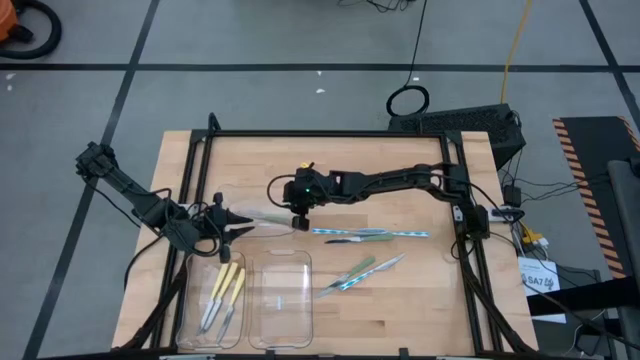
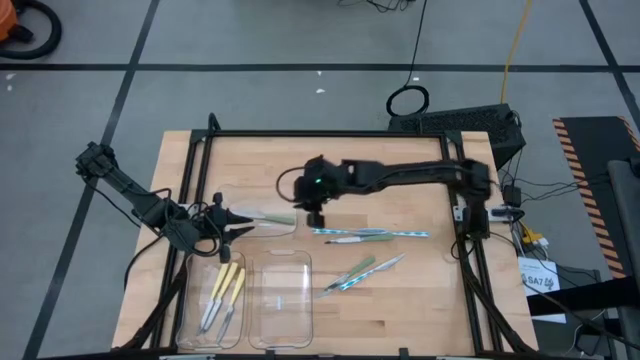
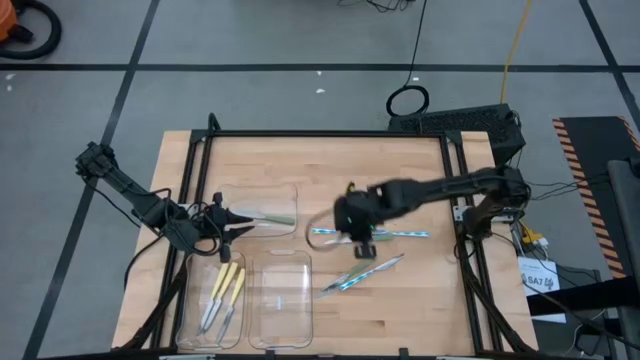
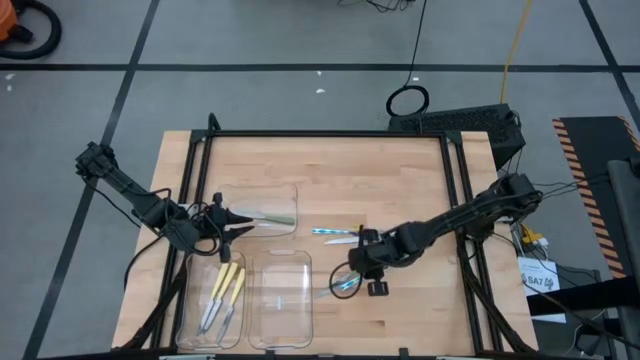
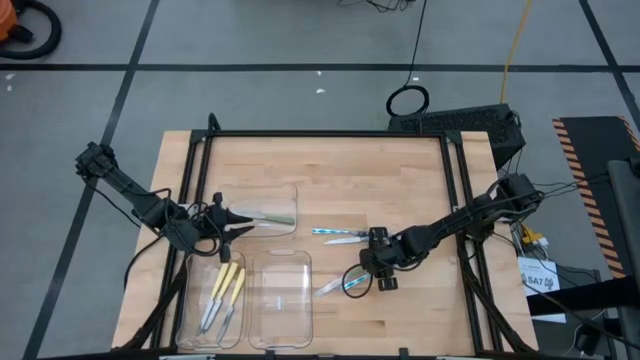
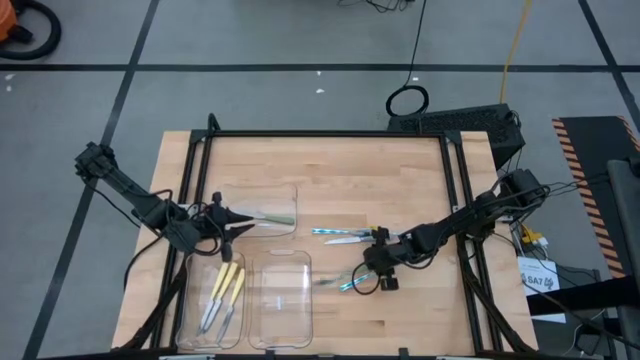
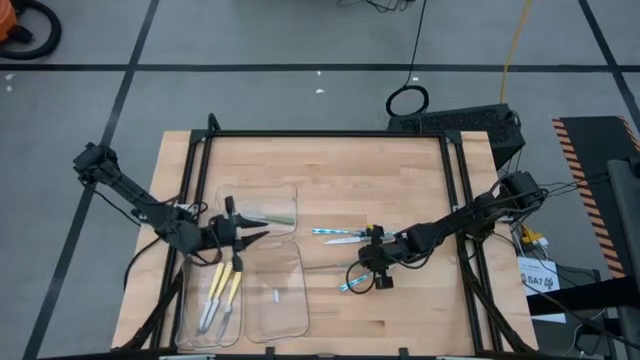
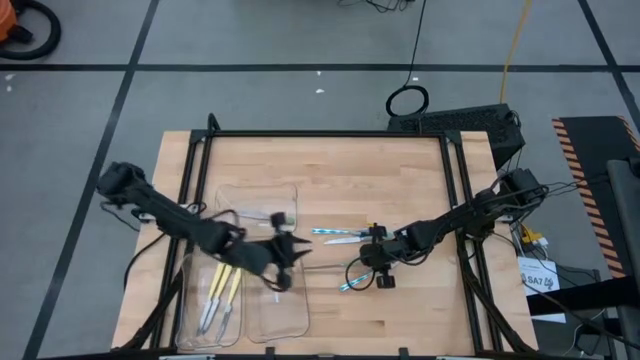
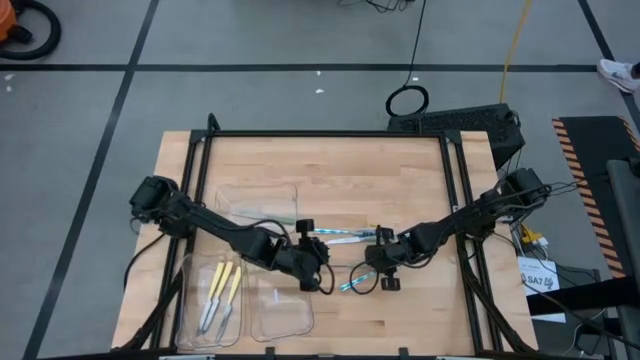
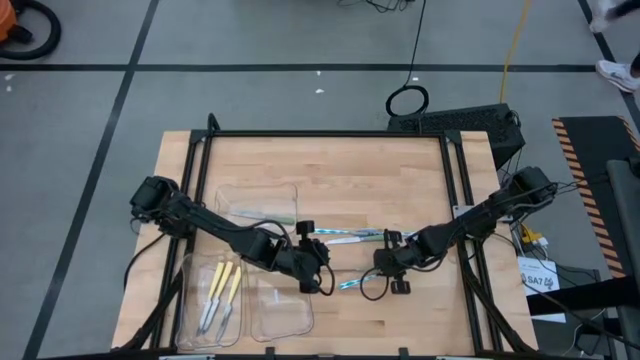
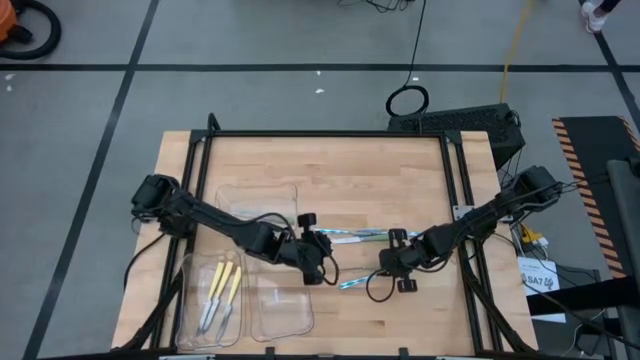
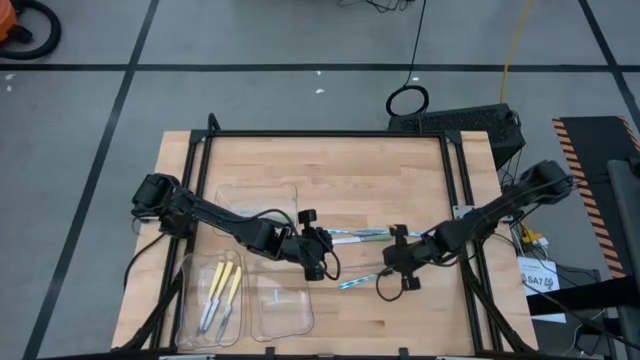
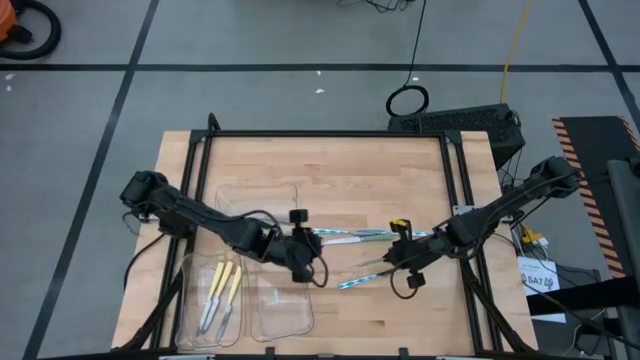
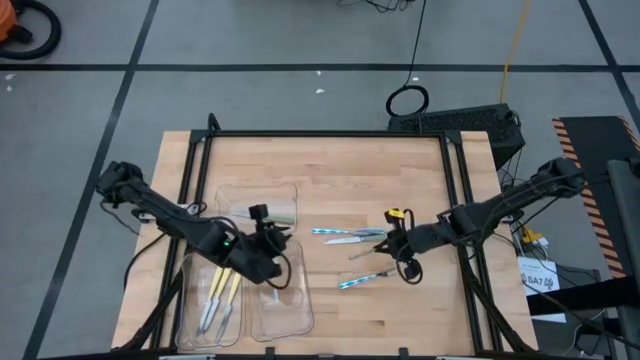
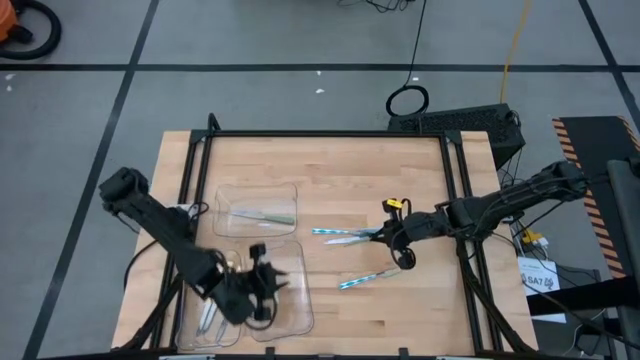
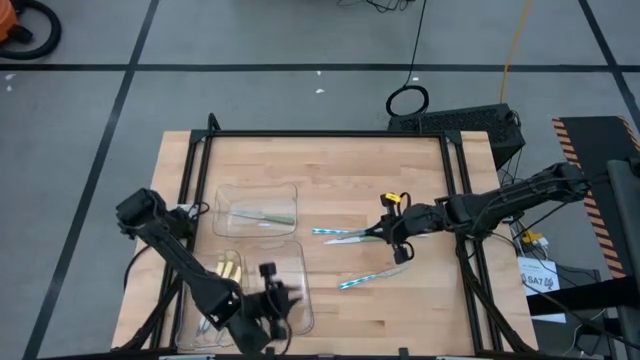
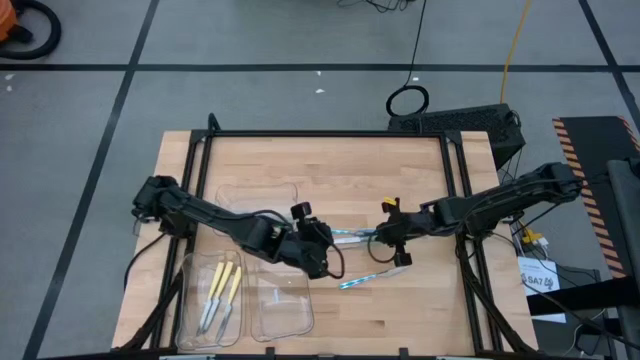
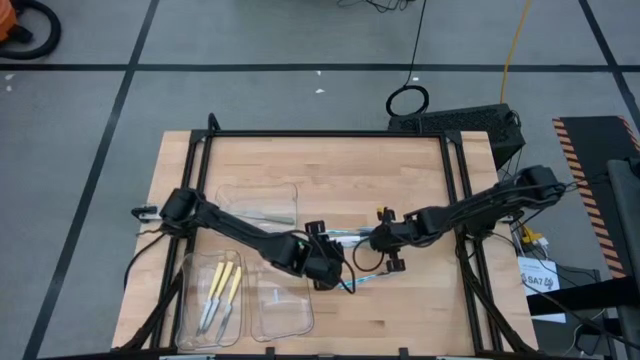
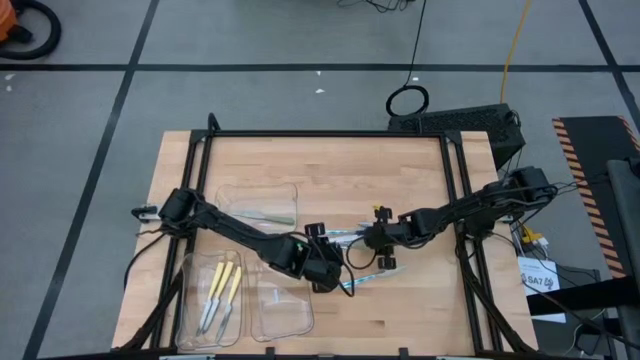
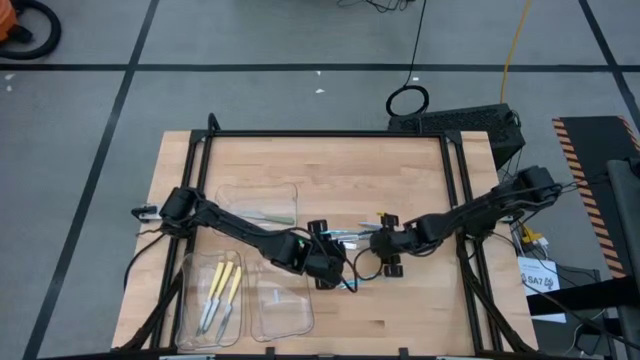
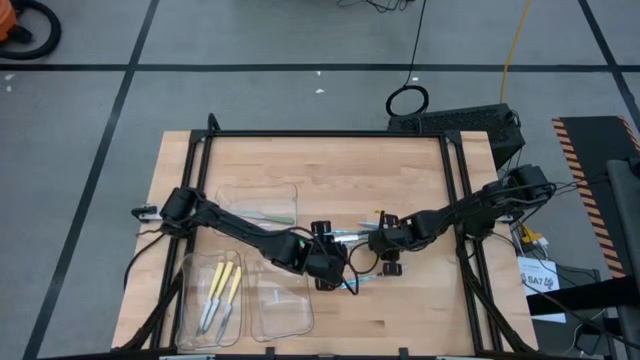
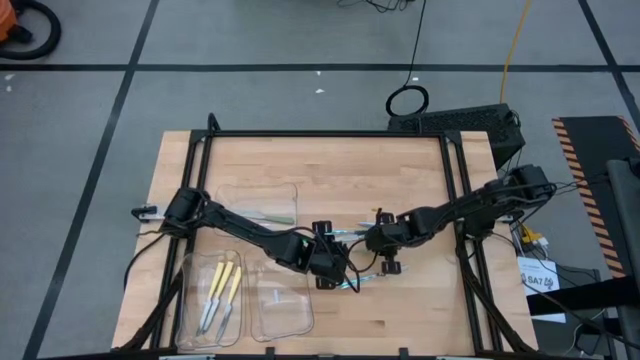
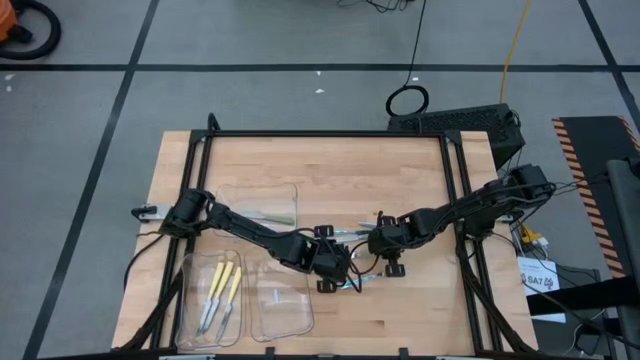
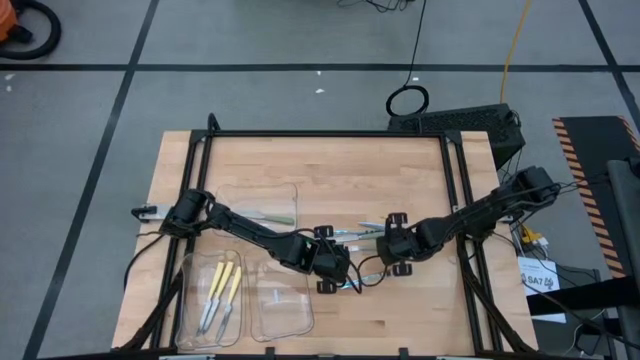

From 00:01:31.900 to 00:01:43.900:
Task: Sort silverware by color (type)
Put the bottom green table knife into the top transparent bin

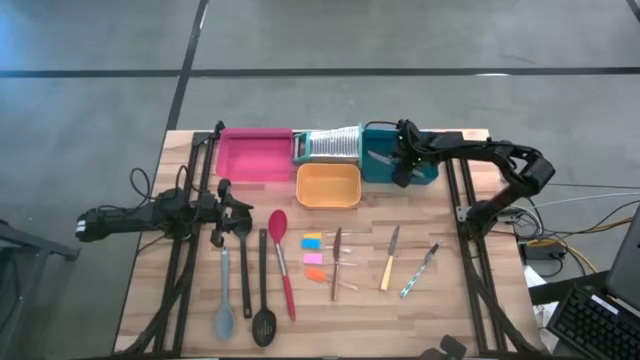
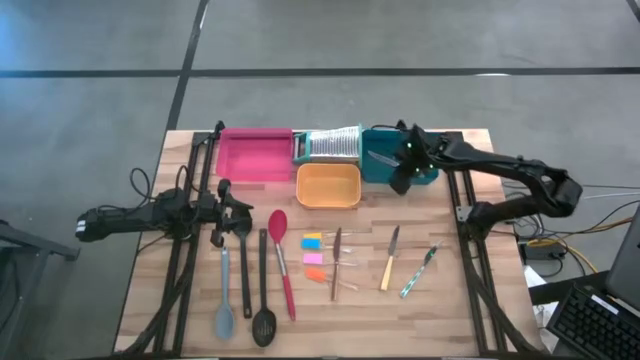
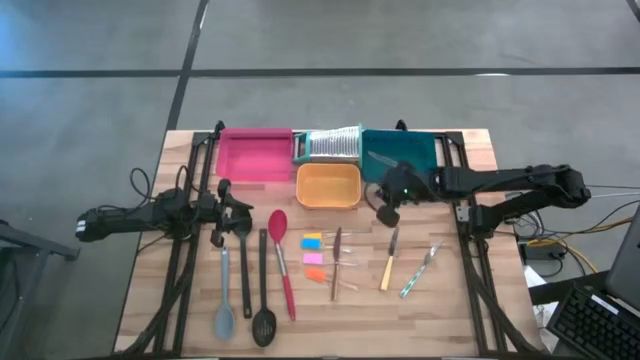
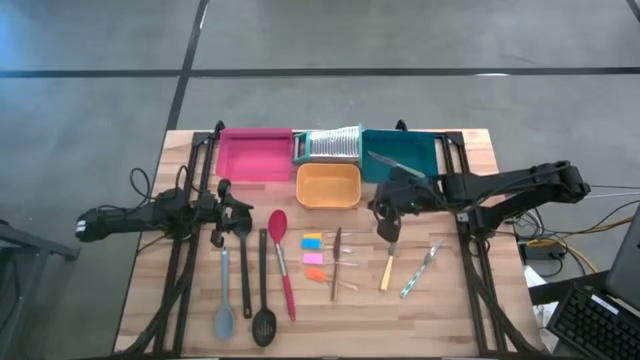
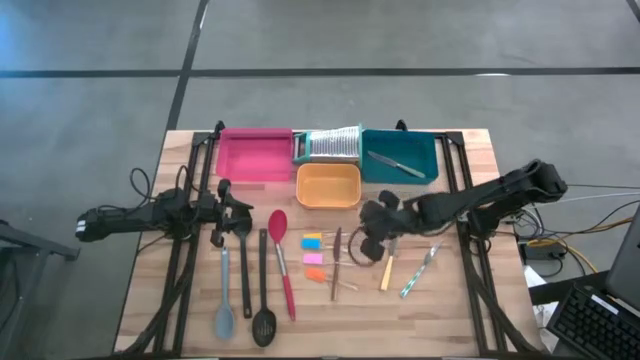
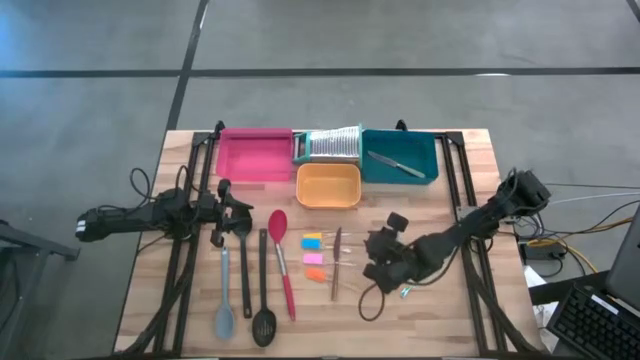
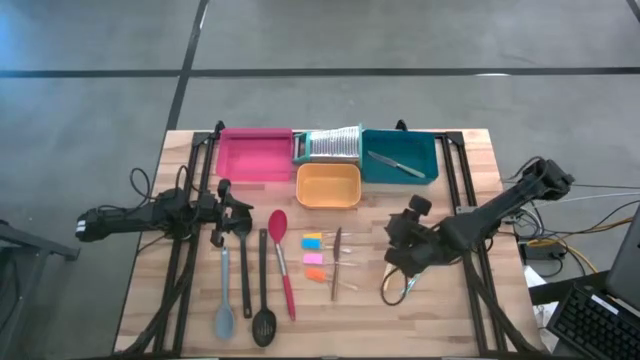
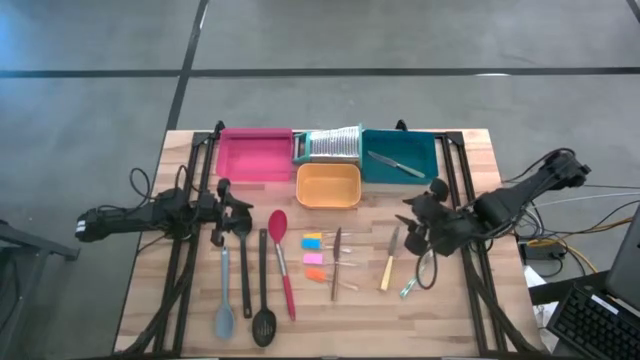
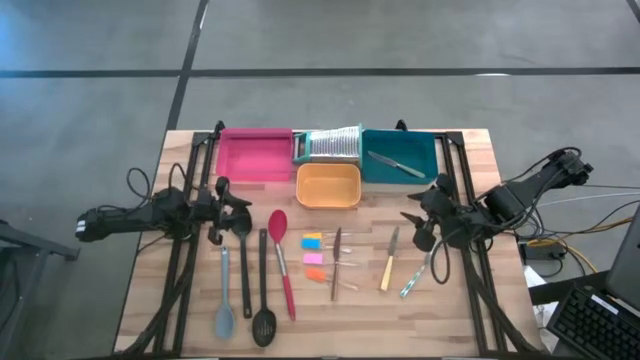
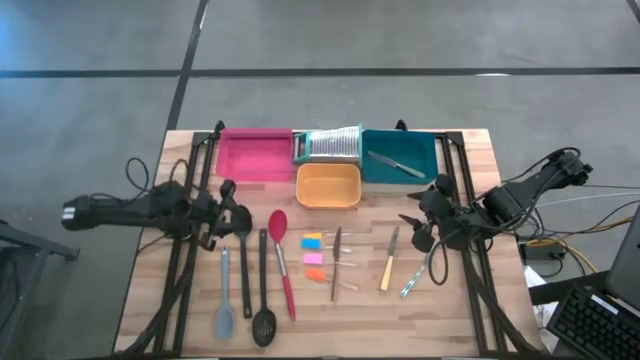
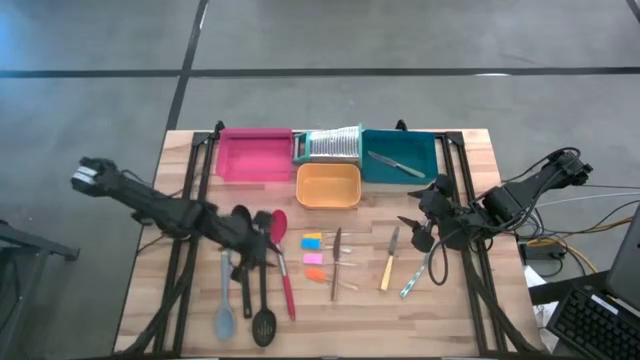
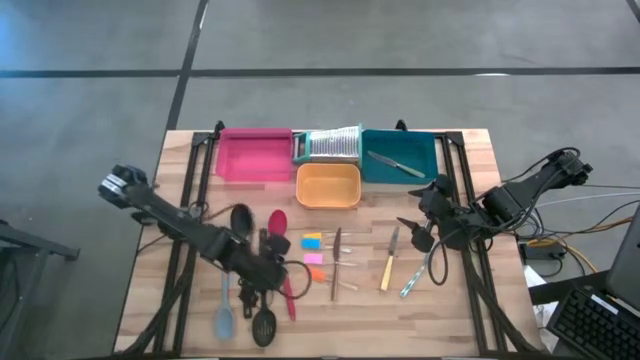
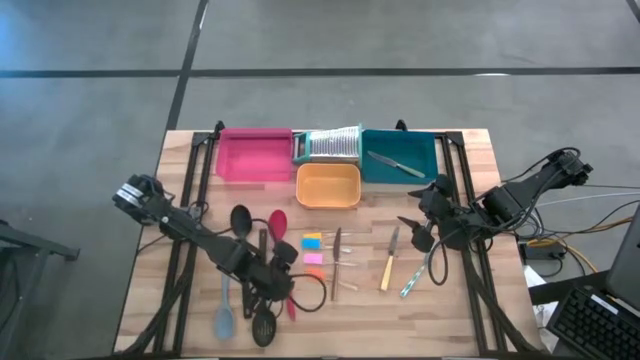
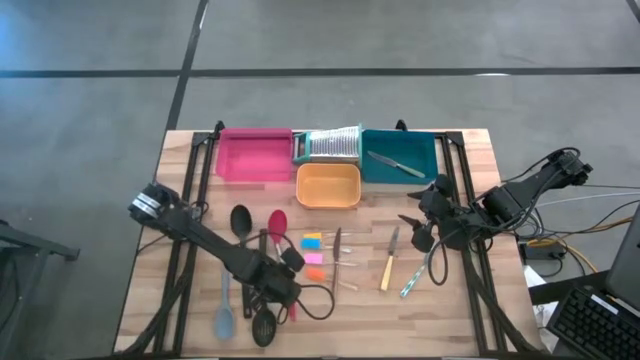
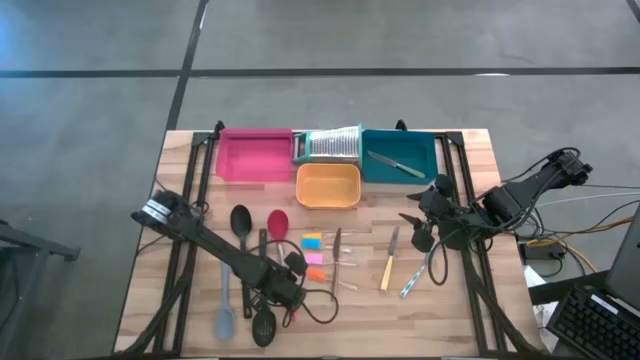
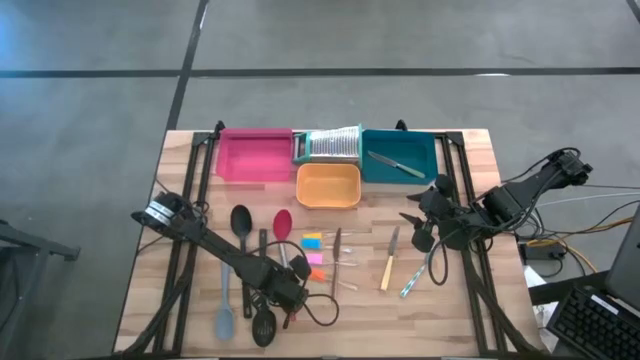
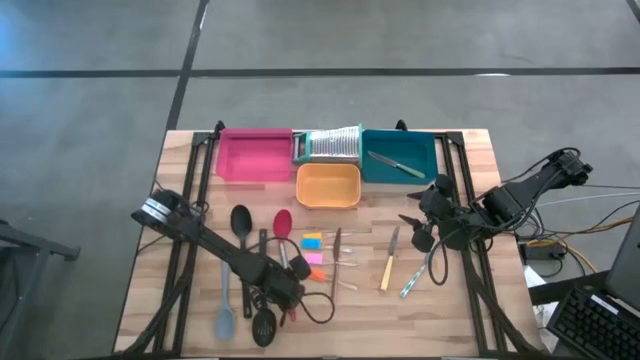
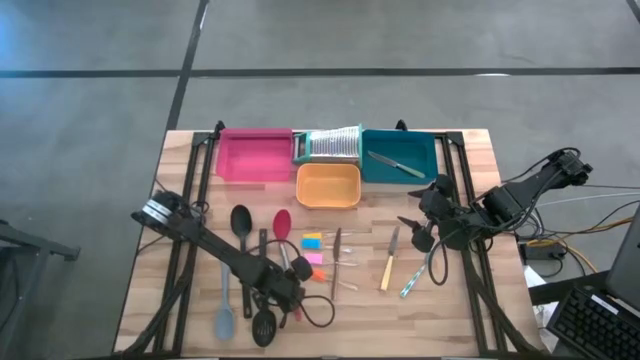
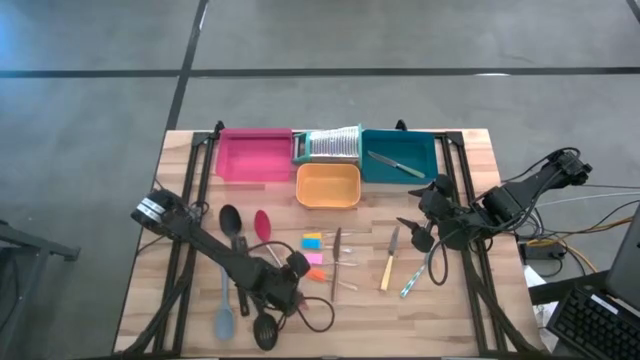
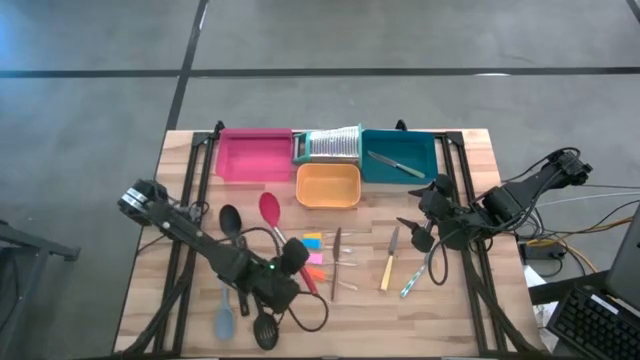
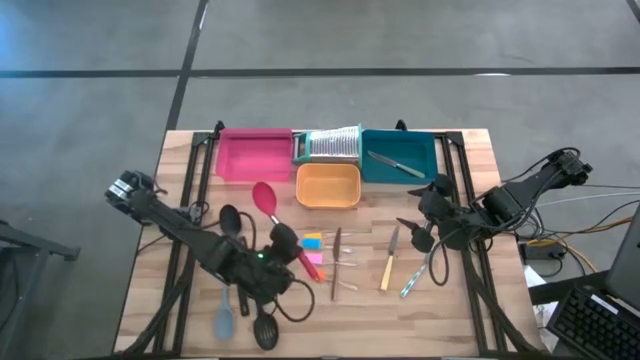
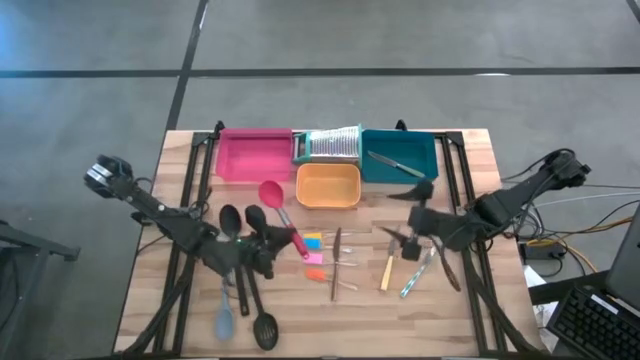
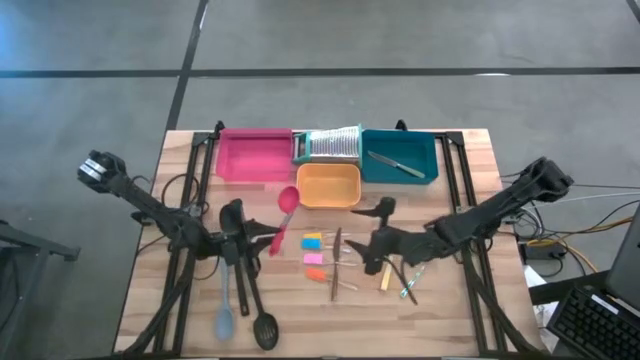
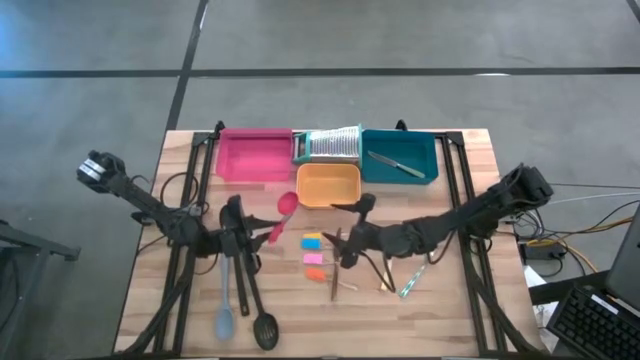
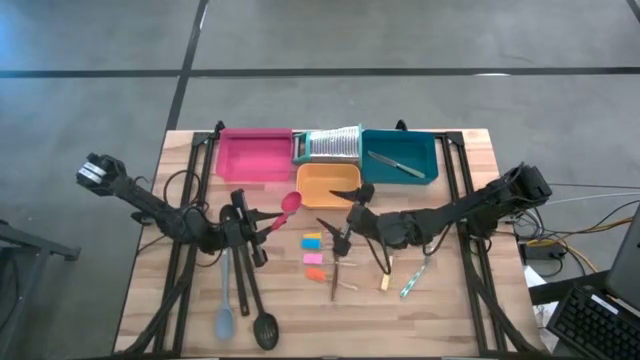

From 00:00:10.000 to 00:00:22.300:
Task: Pick & Place Kitchen Items
Put the red spoon into the pink bin
